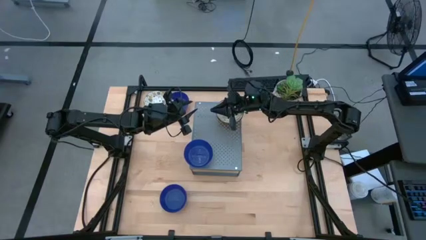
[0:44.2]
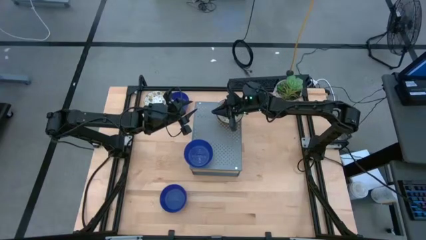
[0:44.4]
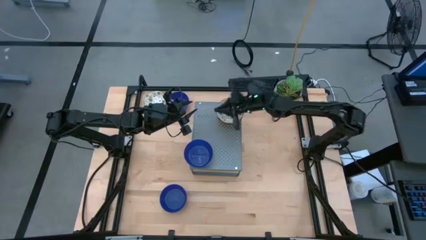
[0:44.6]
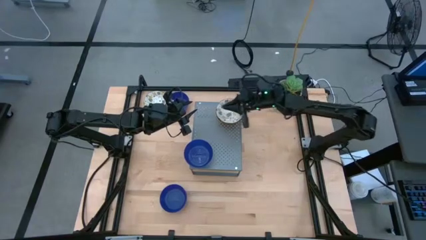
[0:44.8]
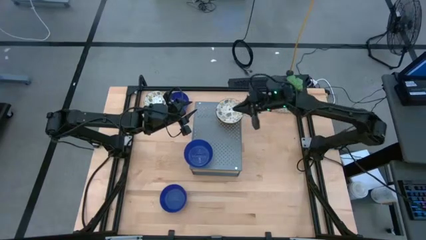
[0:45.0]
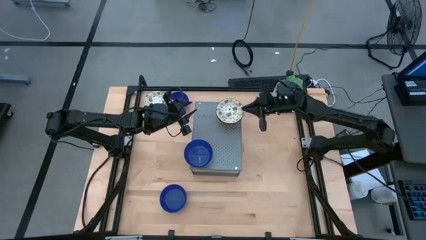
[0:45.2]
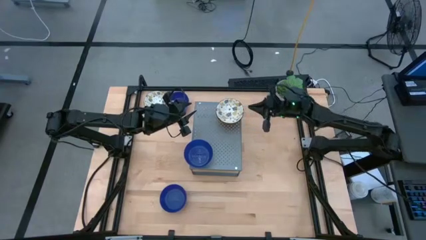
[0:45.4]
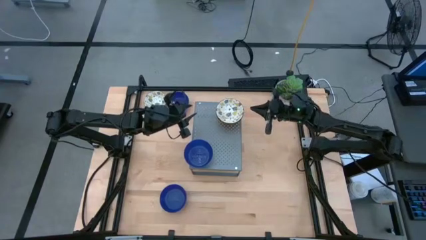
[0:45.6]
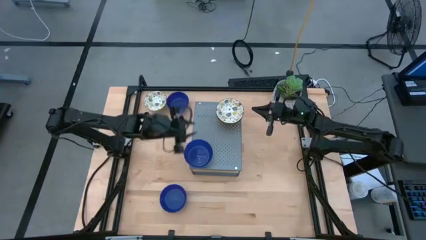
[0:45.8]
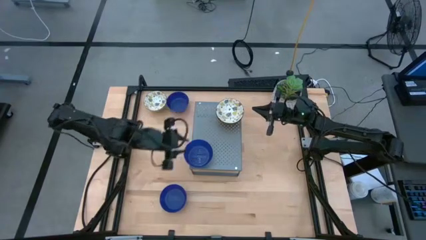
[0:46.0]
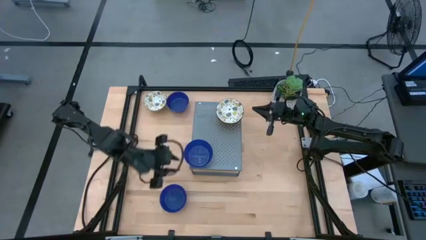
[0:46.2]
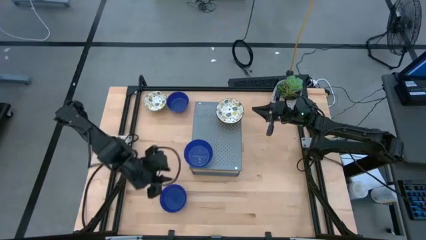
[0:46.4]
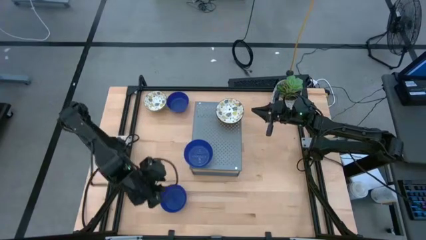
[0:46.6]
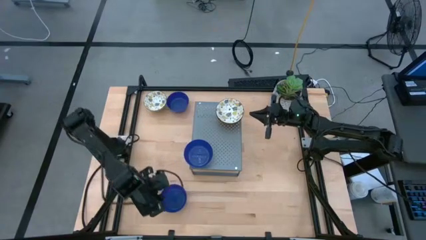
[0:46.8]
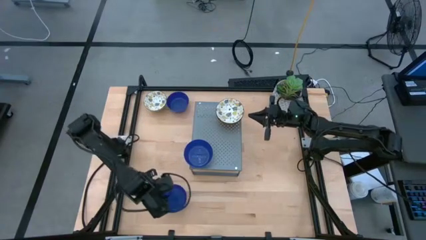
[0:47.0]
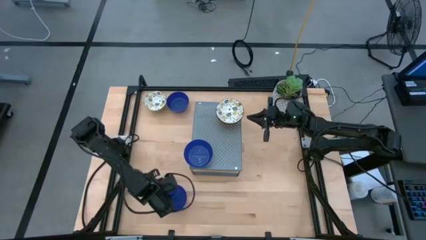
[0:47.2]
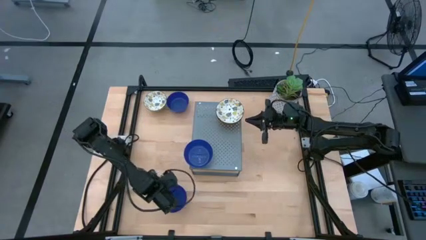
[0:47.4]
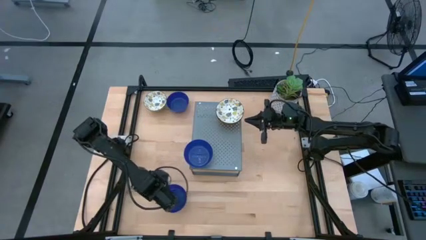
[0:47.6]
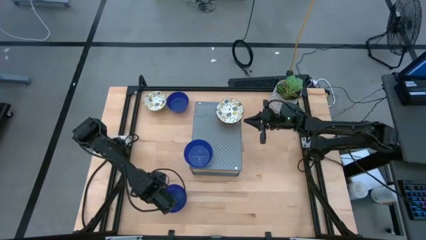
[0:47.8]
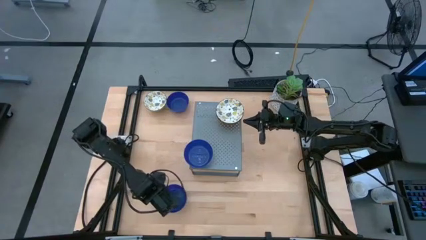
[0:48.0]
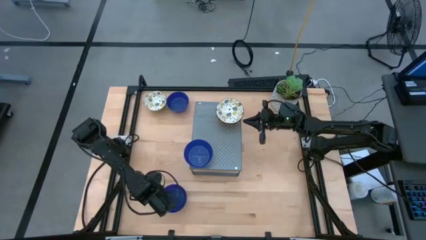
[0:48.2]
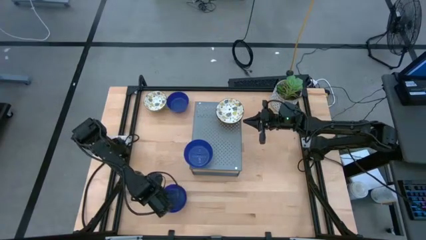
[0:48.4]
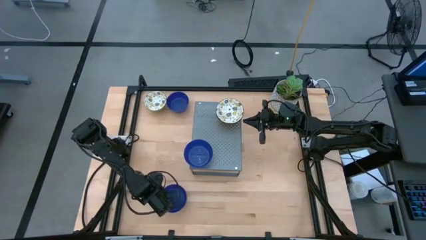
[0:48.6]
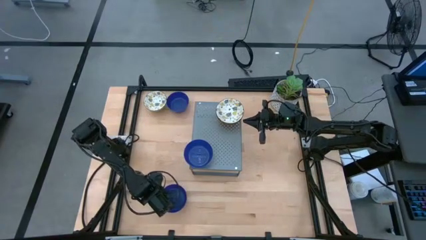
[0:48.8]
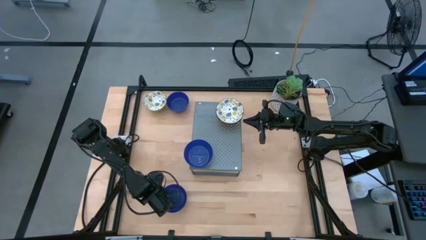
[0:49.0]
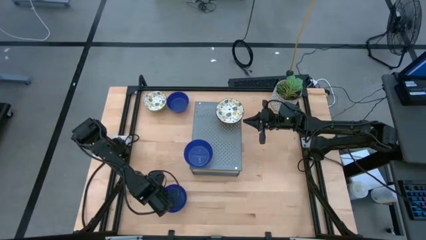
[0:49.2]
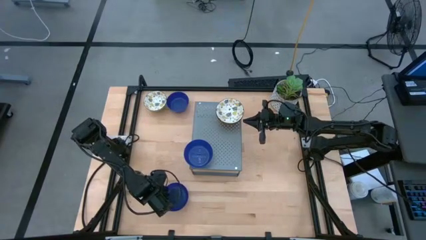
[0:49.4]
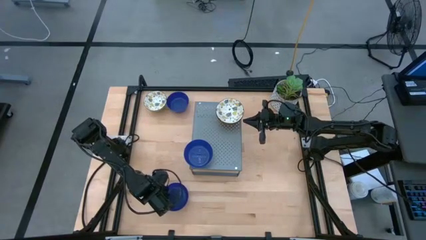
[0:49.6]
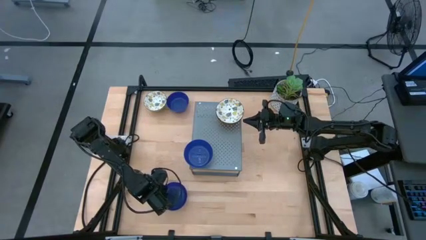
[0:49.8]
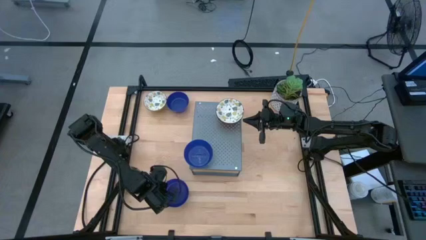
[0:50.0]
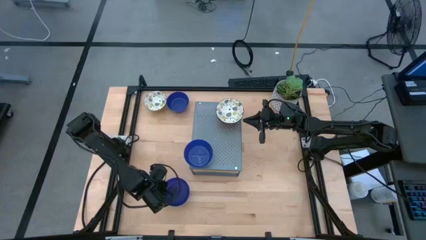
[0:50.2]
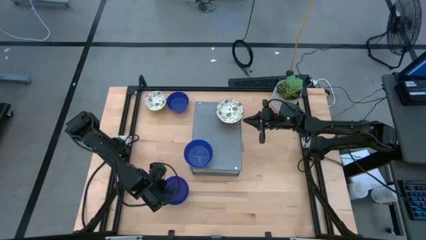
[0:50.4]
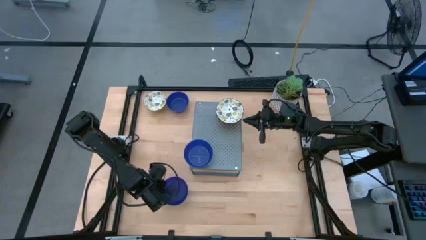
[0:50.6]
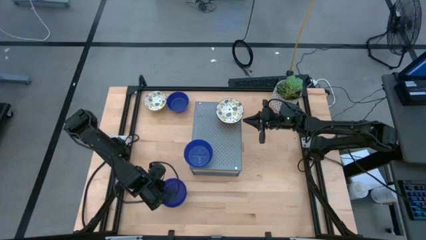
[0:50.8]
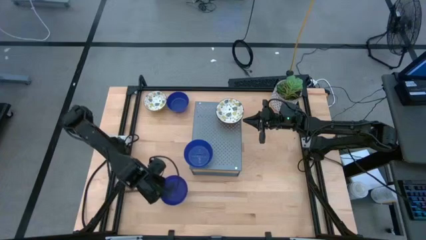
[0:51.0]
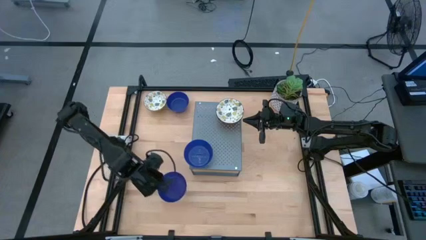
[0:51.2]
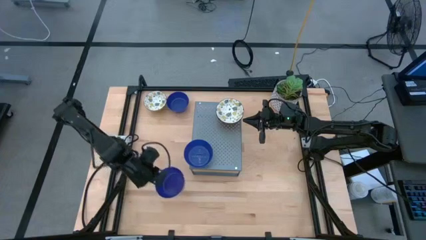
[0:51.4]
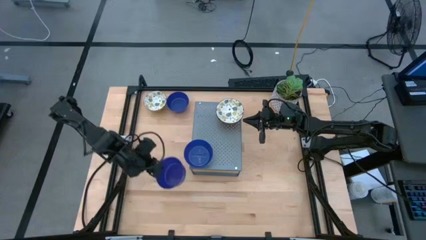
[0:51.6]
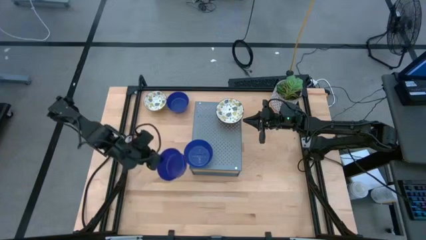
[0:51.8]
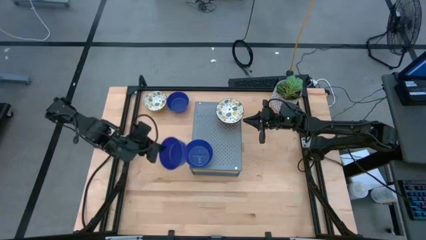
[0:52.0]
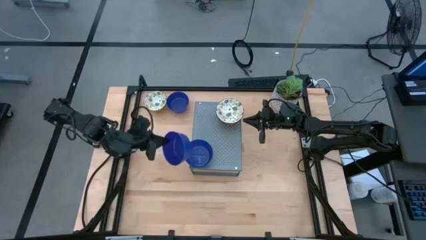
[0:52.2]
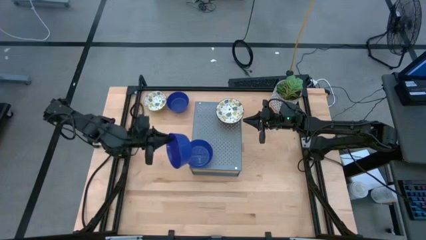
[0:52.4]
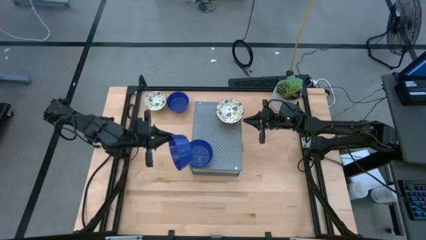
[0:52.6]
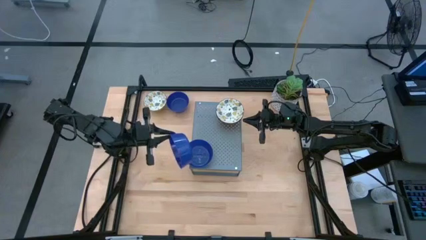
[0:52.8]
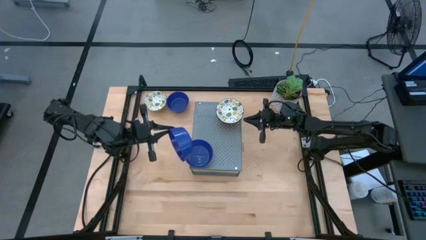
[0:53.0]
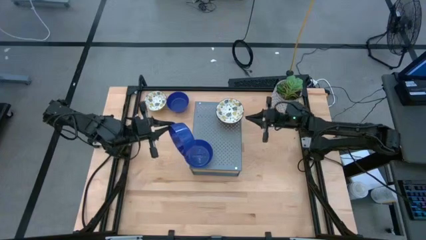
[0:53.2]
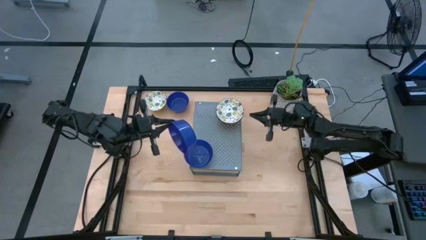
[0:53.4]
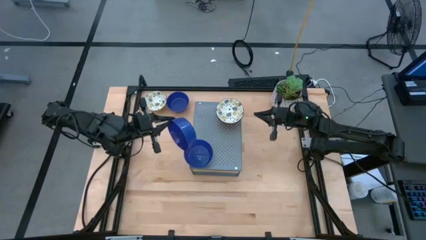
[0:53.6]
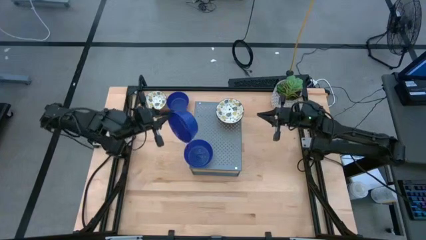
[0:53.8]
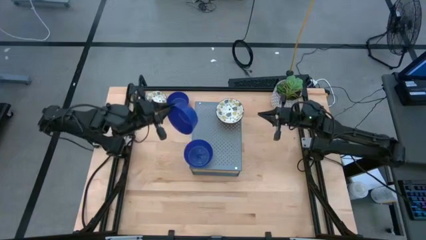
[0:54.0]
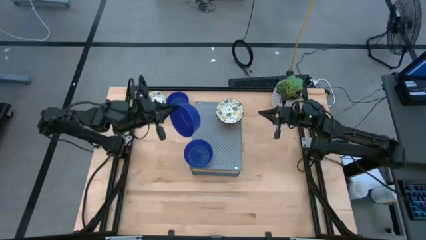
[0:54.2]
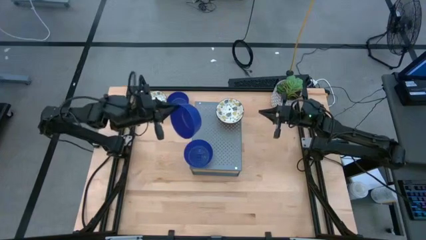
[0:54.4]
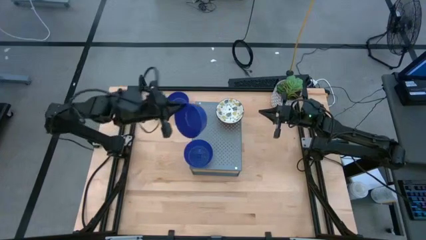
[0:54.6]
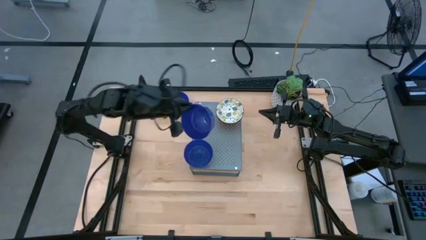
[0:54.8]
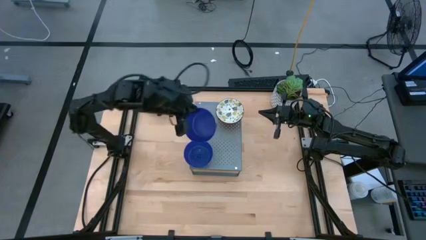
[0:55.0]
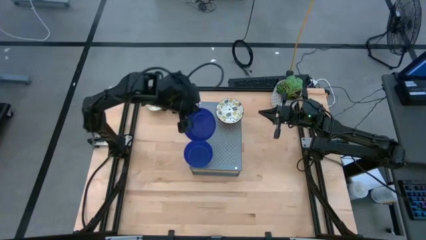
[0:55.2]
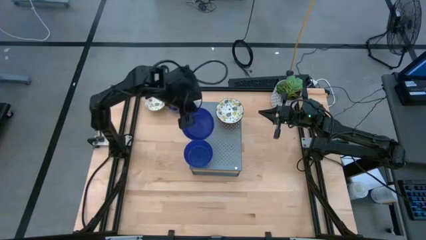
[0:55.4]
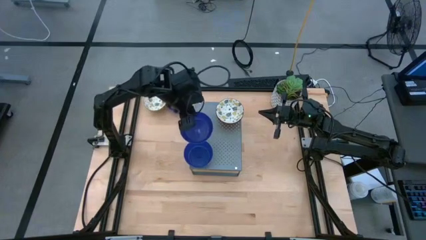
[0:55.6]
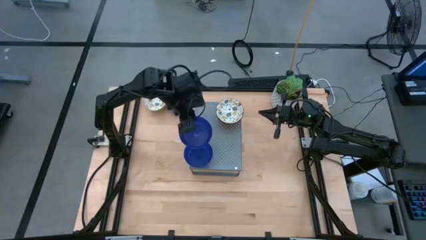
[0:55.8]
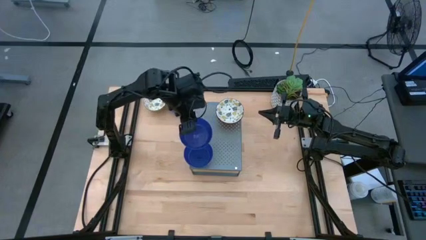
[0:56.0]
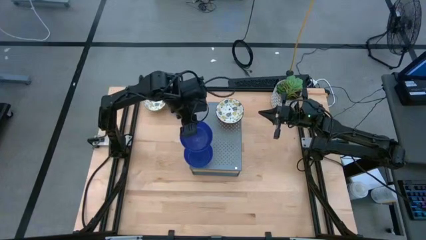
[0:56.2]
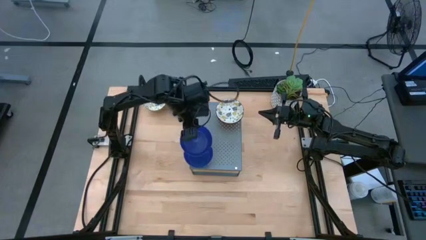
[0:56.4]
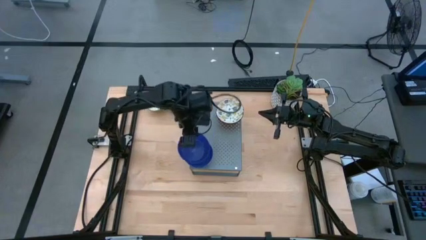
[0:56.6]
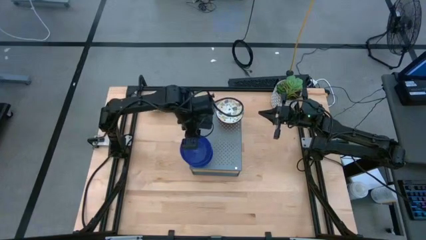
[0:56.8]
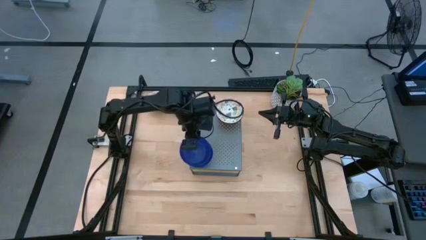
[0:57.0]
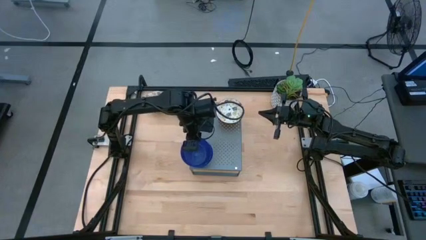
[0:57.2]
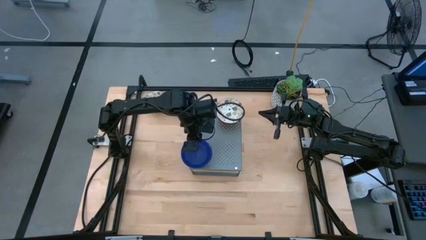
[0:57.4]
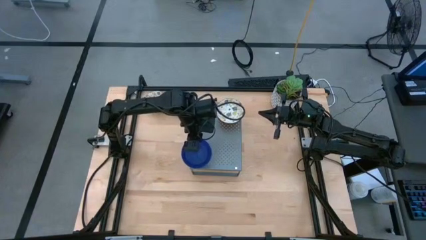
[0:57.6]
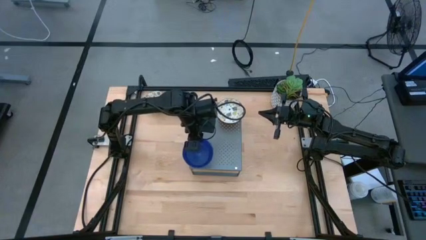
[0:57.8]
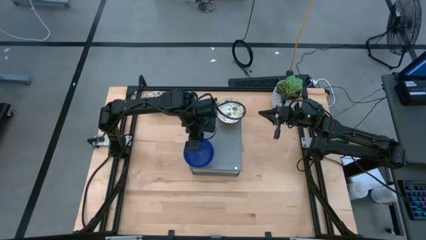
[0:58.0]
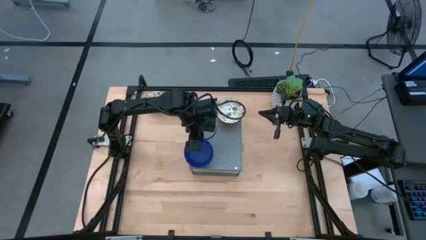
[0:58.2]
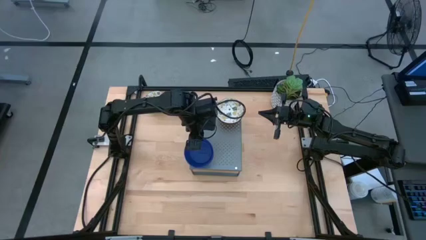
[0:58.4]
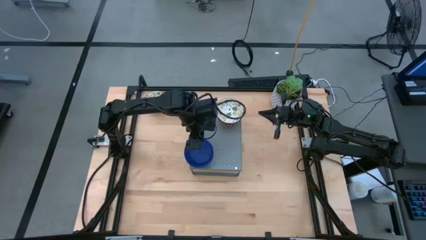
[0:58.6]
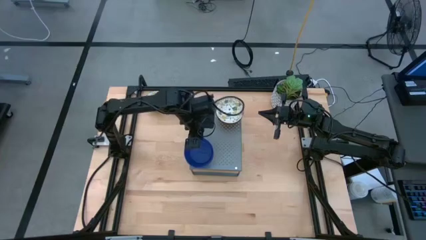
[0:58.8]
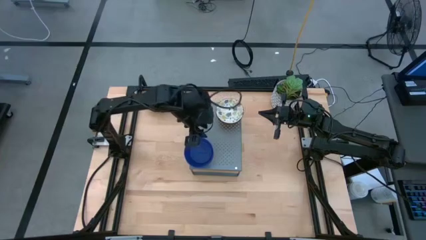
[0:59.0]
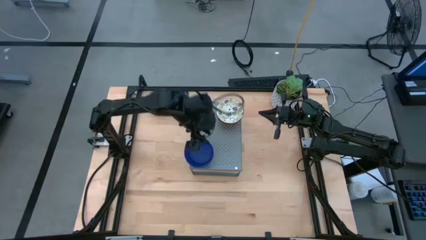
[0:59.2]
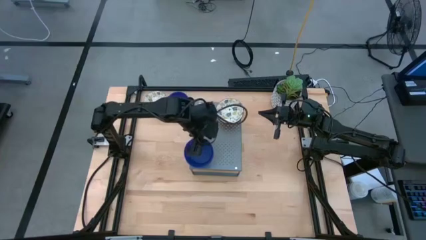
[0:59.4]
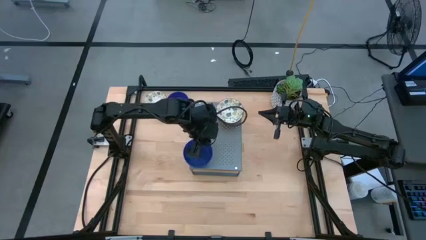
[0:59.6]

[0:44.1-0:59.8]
Task: Pick & Place Mini bowls
Stack the bottom blue bowl on top of the blue bowl on the shelf
